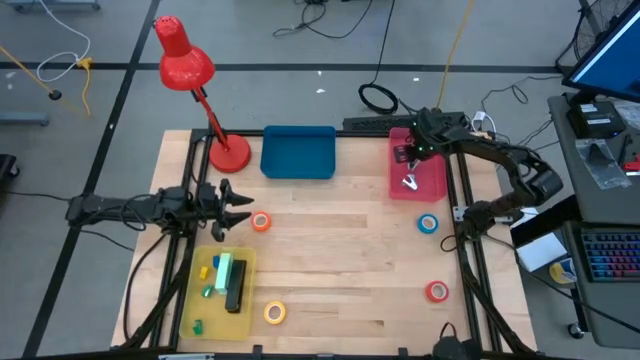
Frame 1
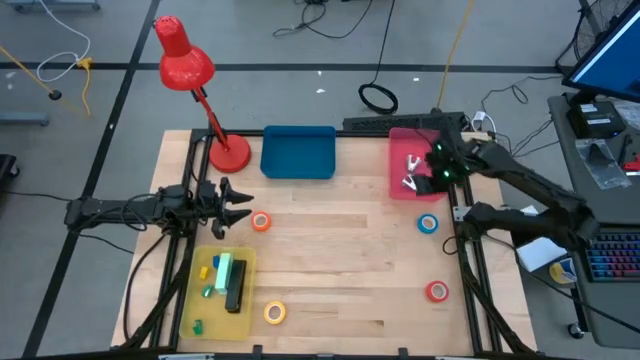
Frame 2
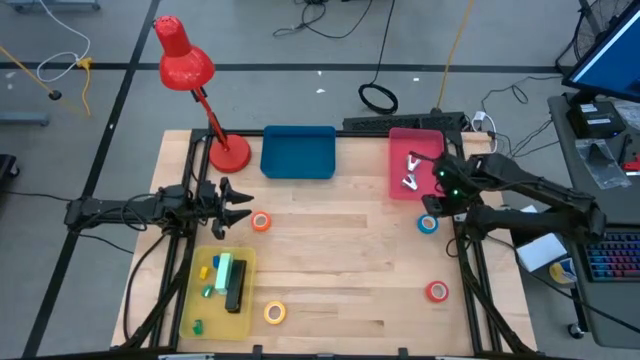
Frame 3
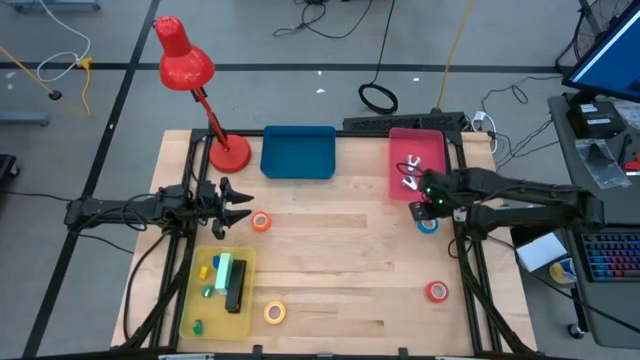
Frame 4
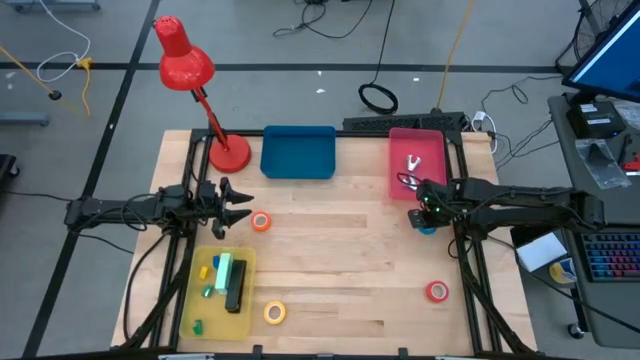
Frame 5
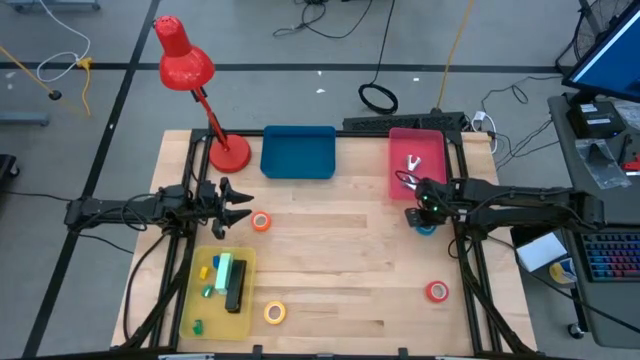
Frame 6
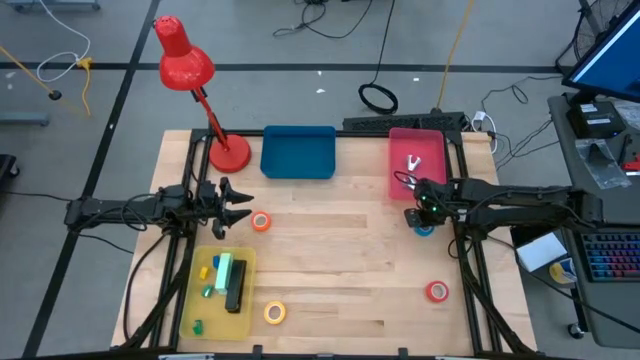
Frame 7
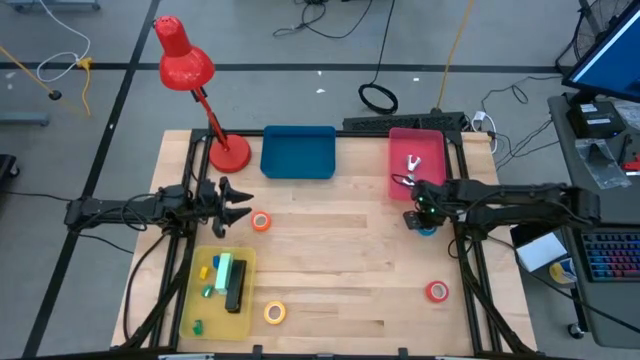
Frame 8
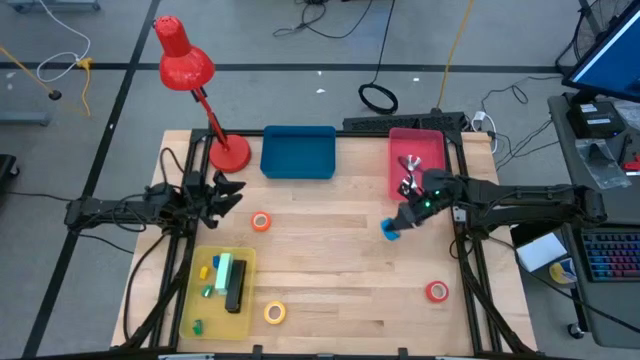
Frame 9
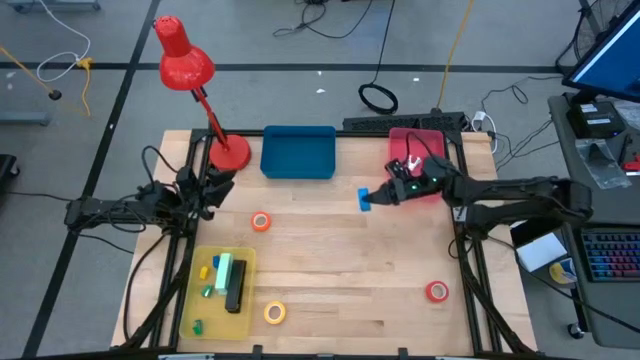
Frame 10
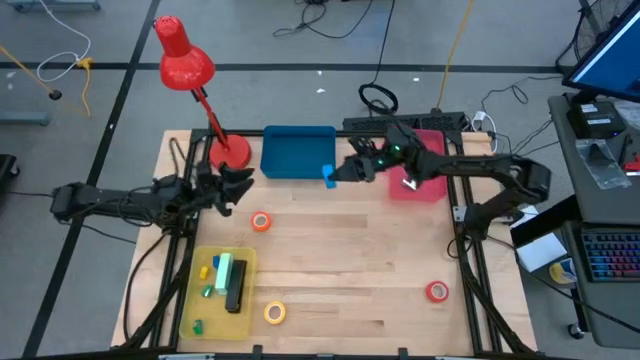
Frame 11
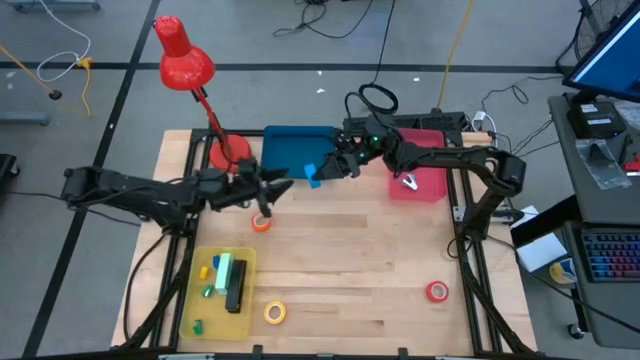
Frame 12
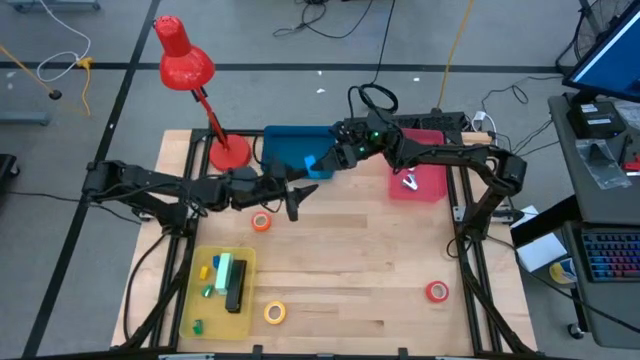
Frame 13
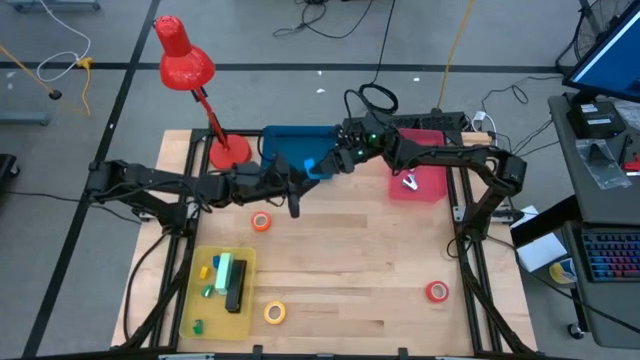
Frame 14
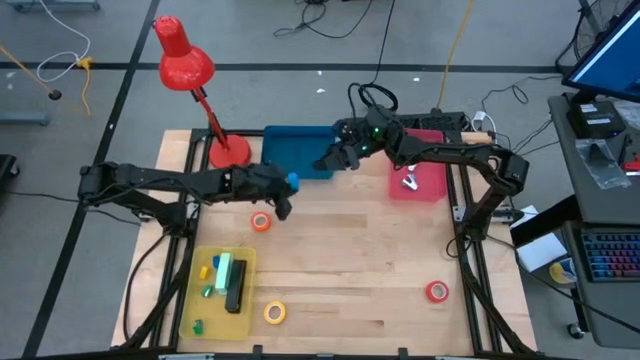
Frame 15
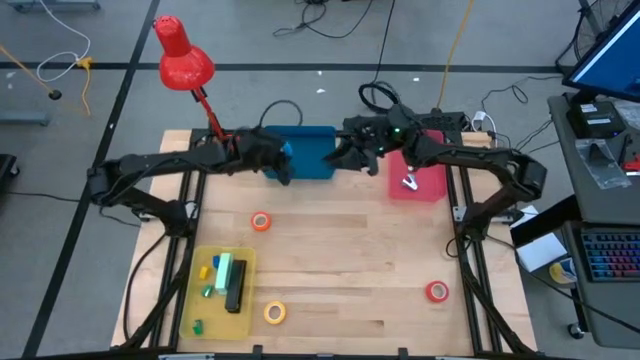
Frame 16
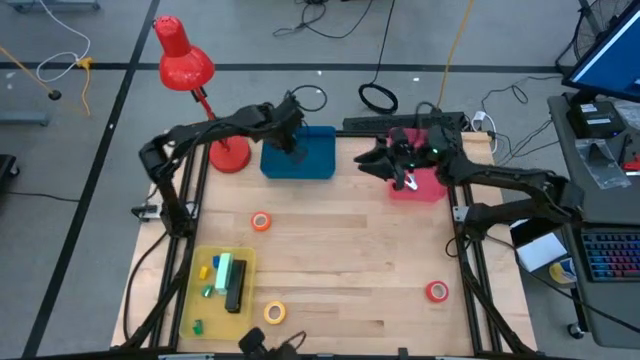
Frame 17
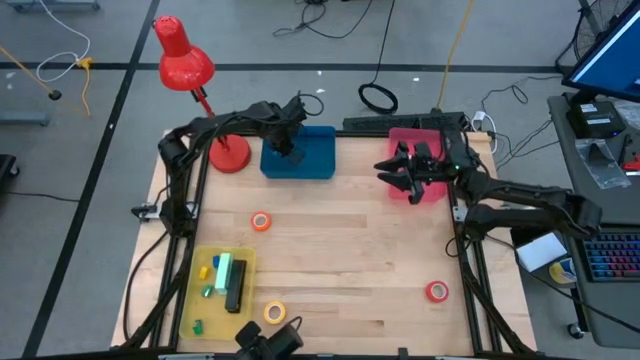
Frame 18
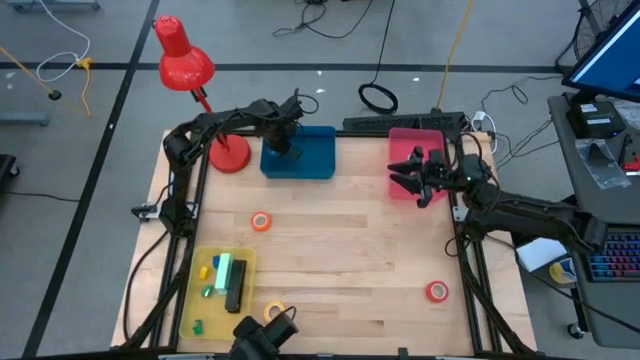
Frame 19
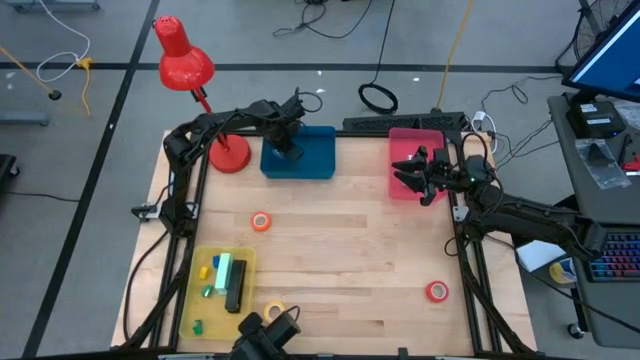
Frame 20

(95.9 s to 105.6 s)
Task: Pick and place Stapler, Stapler remover, tape
Put the blue tape into the blue bin

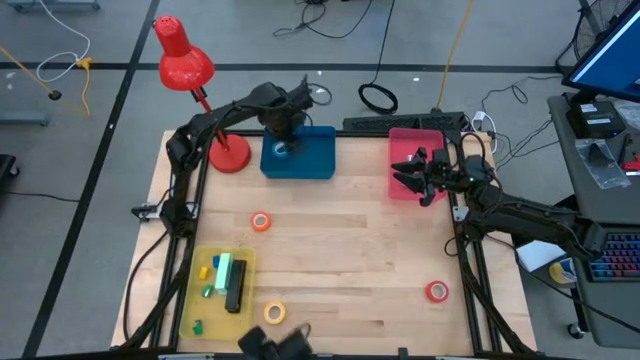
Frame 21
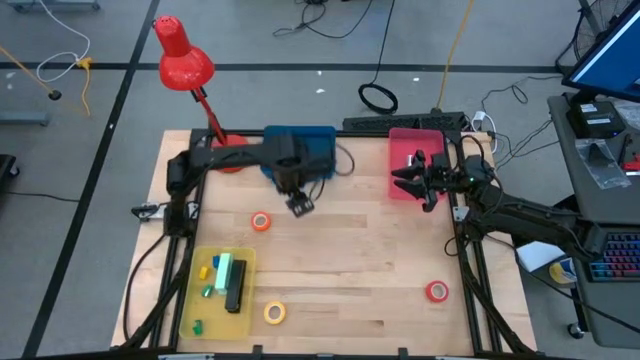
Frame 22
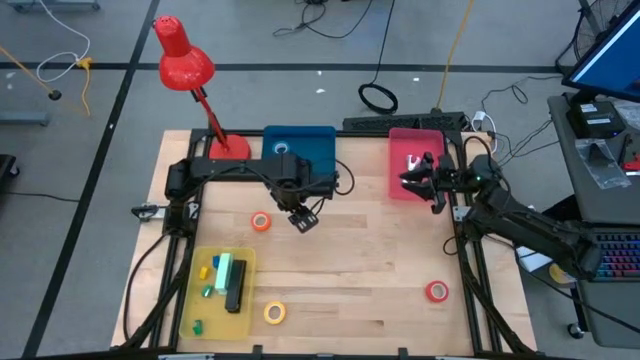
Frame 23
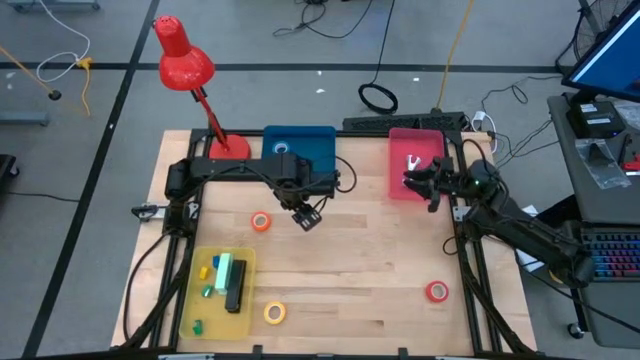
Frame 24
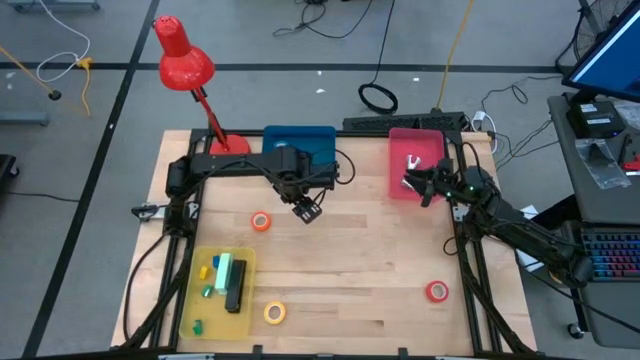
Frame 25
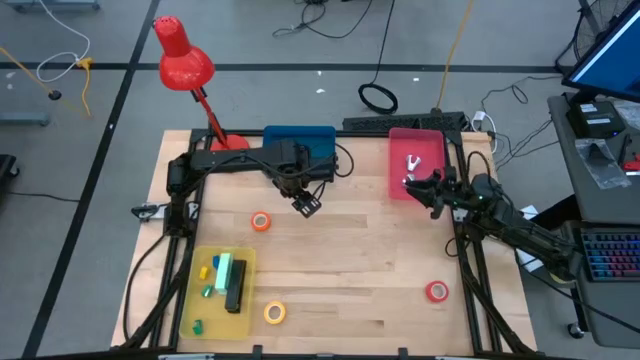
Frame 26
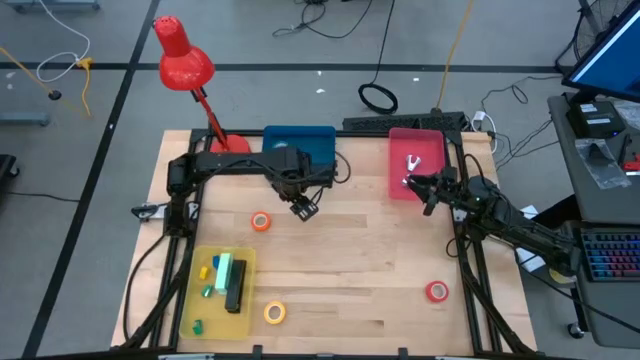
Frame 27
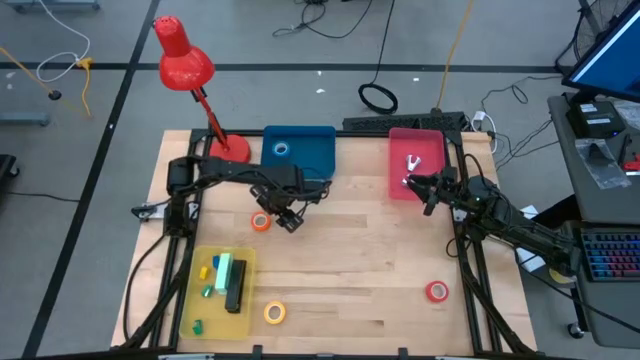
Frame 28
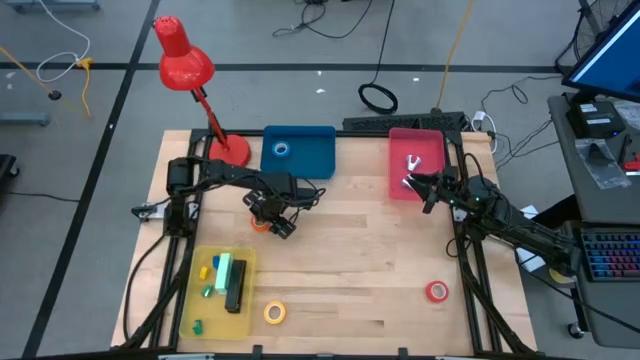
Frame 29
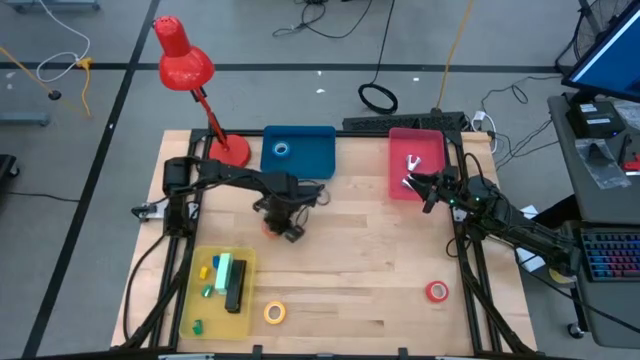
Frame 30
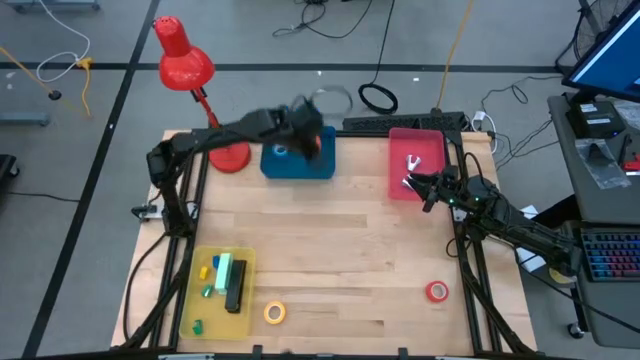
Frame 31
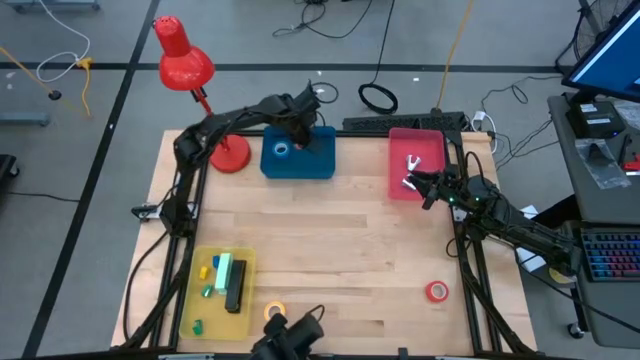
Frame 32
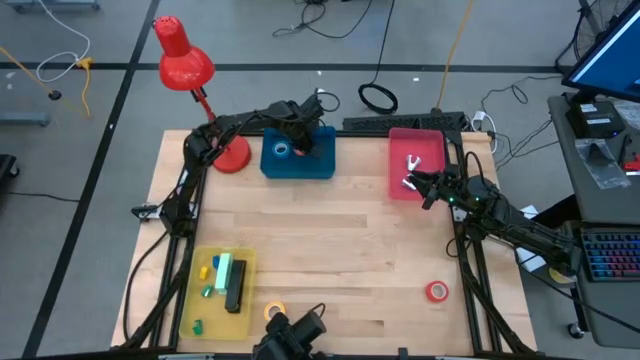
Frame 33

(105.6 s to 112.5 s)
Put the orange tape on the blue bin

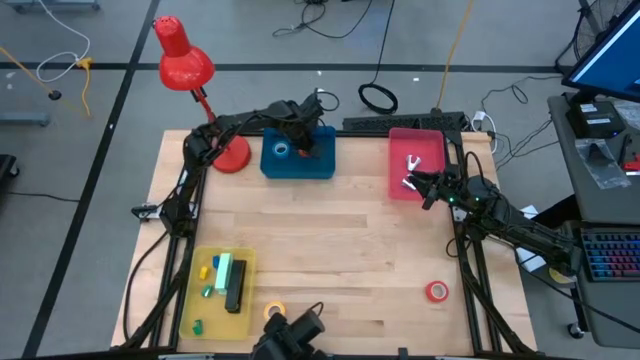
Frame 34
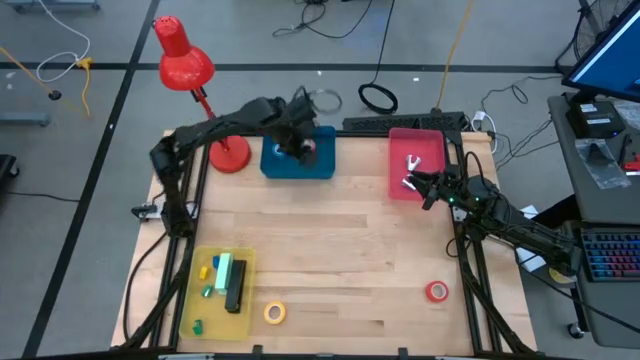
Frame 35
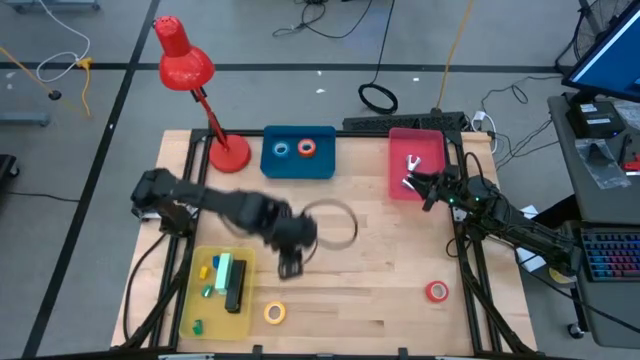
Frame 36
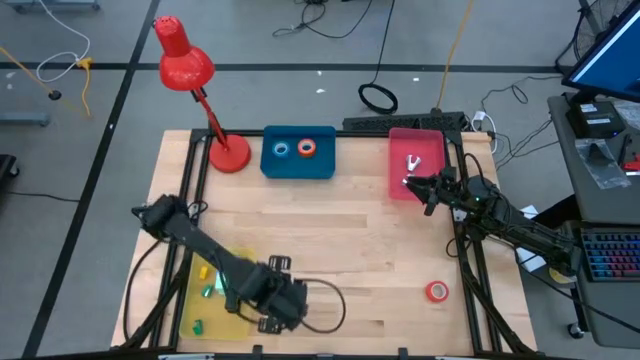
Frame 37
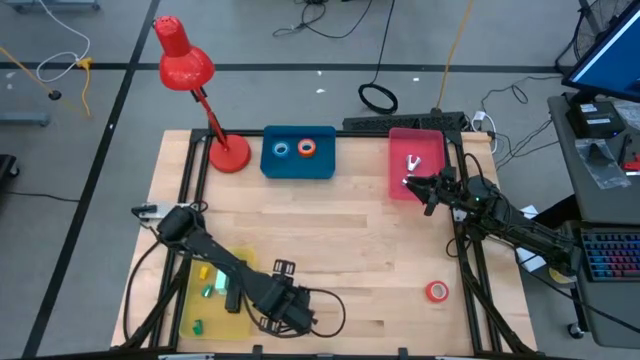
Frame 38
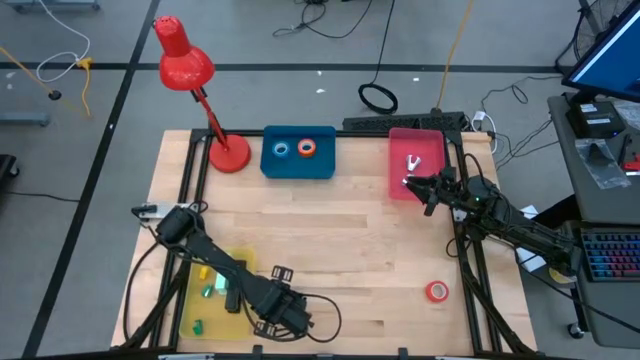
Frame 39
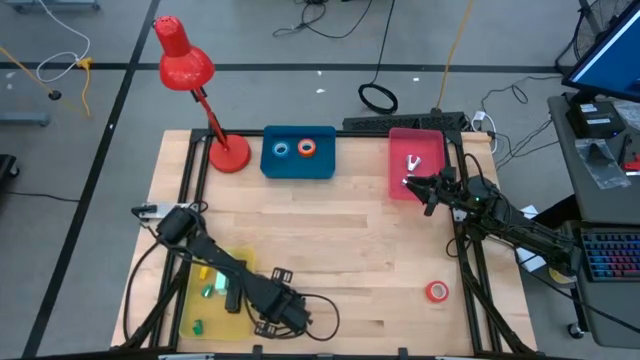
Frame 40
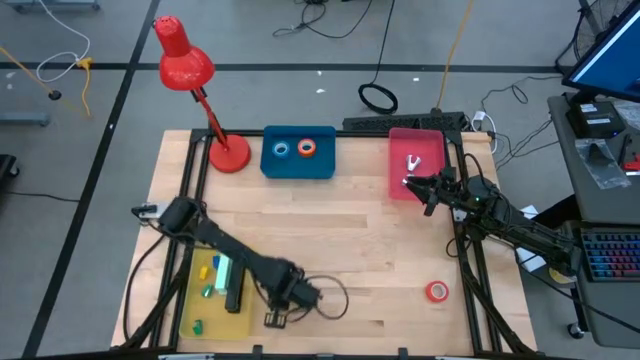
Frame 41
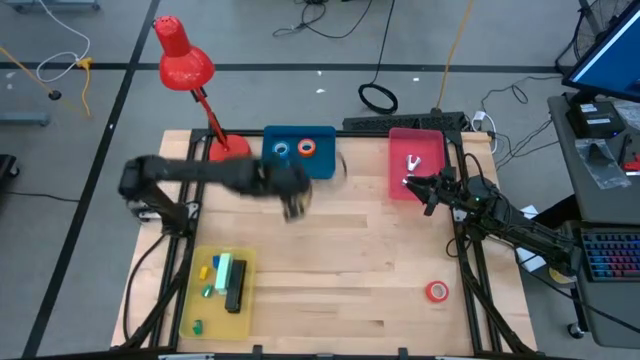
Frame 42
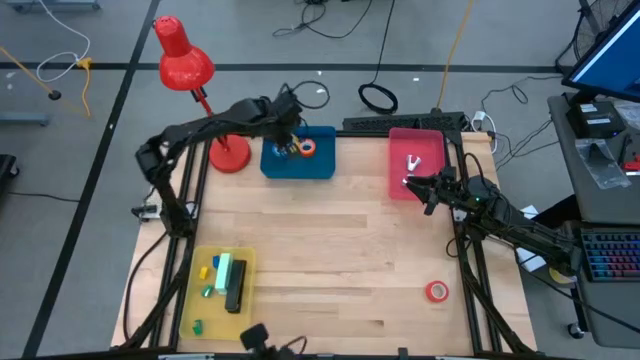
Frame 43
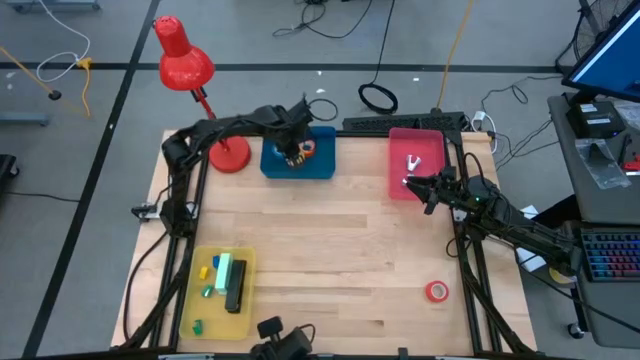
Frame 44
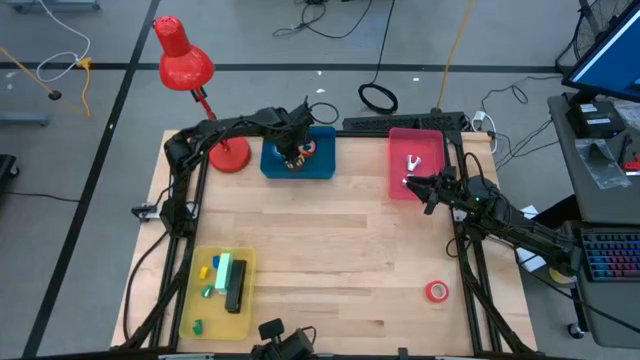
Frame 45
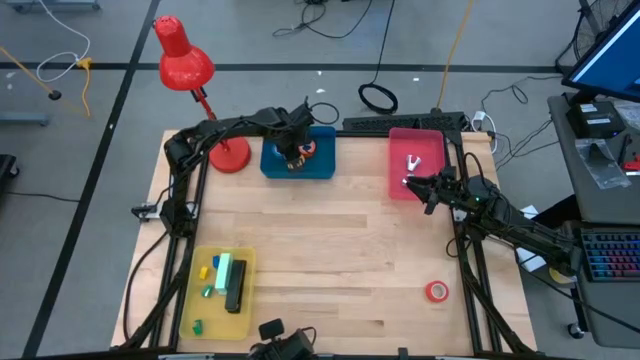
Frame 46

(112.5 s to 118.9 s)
Put the yellow tape into the blue bin
